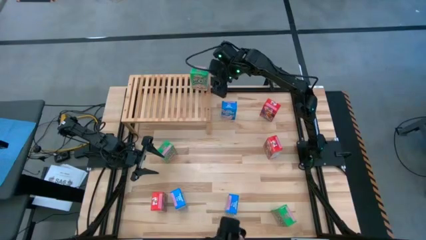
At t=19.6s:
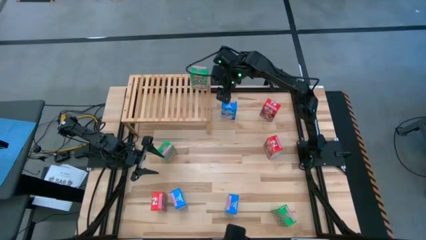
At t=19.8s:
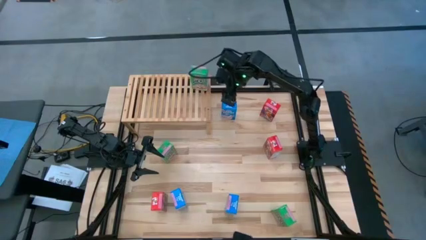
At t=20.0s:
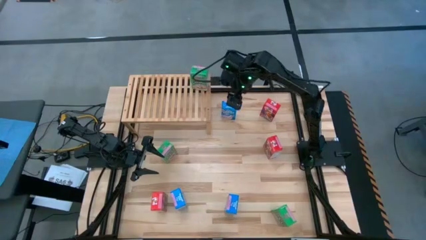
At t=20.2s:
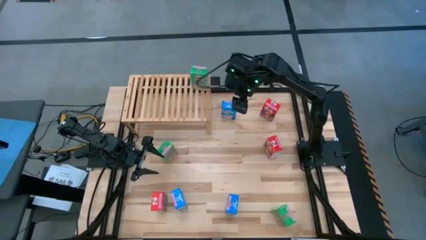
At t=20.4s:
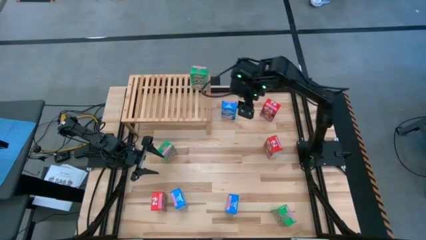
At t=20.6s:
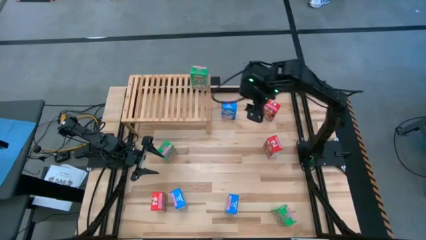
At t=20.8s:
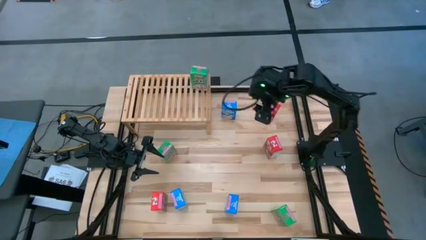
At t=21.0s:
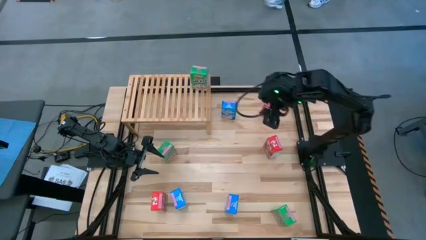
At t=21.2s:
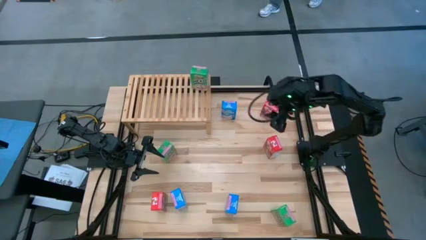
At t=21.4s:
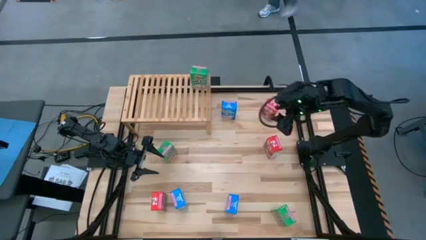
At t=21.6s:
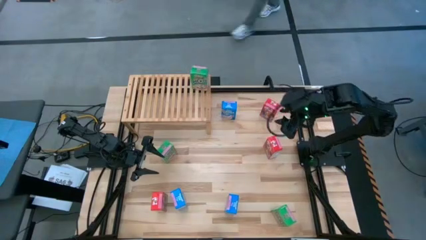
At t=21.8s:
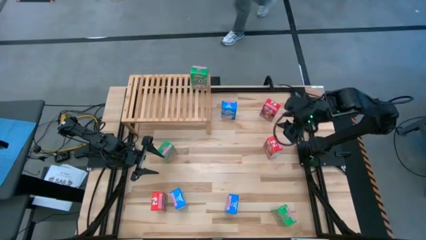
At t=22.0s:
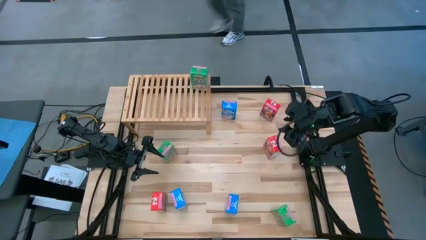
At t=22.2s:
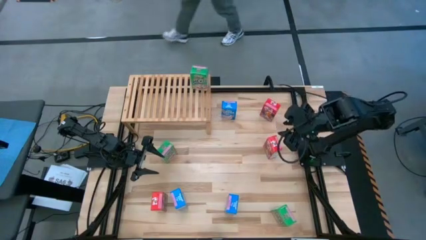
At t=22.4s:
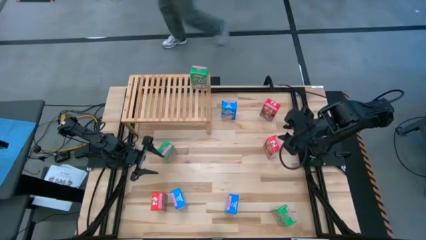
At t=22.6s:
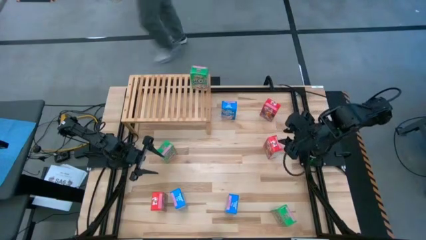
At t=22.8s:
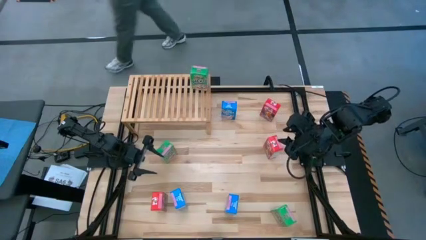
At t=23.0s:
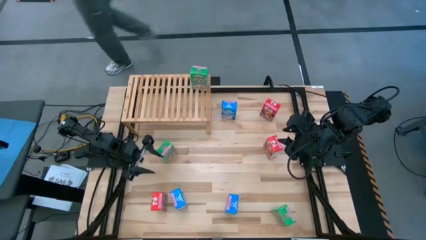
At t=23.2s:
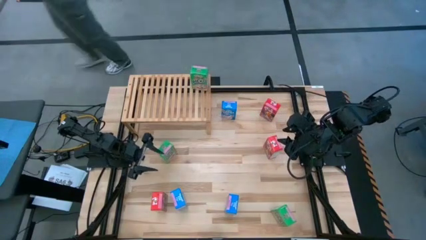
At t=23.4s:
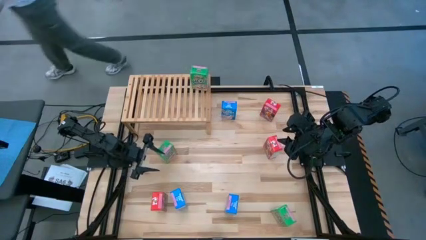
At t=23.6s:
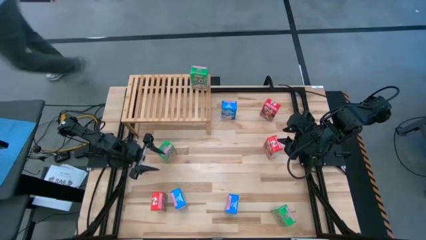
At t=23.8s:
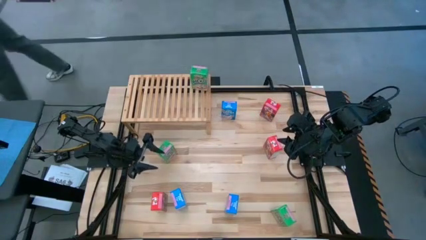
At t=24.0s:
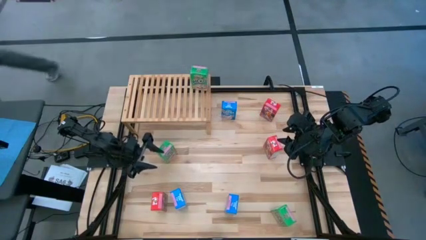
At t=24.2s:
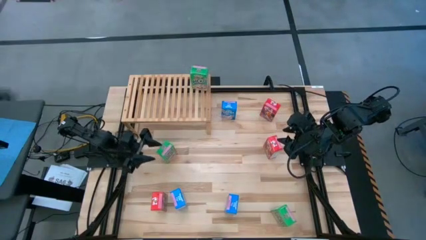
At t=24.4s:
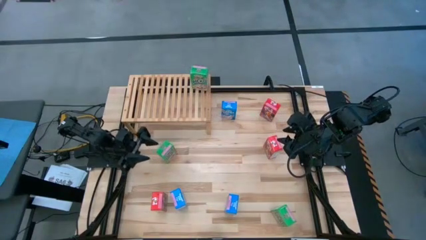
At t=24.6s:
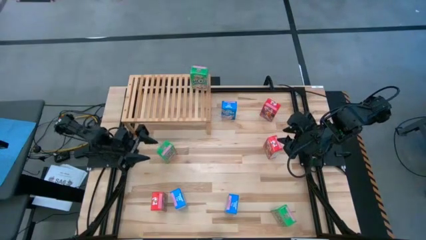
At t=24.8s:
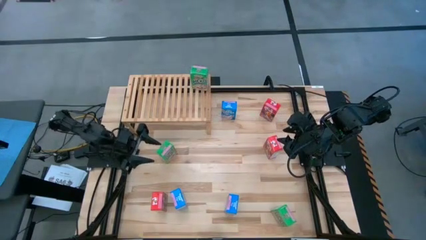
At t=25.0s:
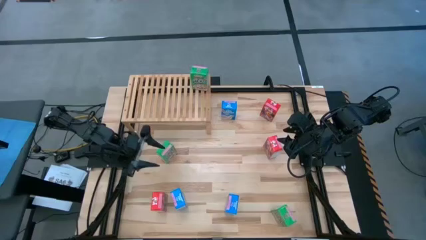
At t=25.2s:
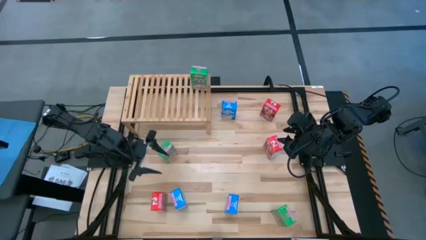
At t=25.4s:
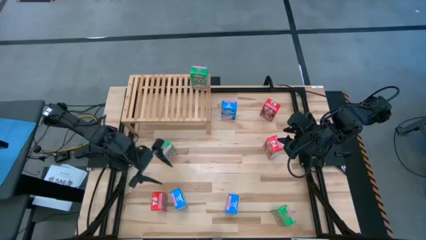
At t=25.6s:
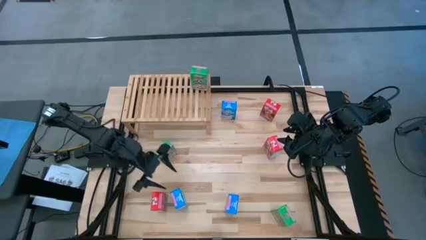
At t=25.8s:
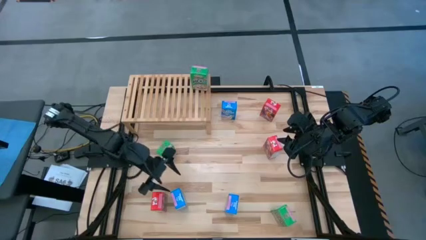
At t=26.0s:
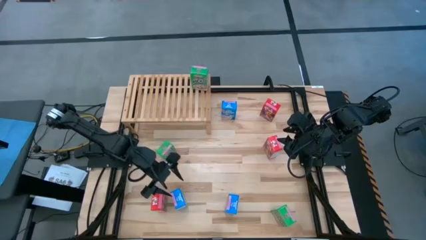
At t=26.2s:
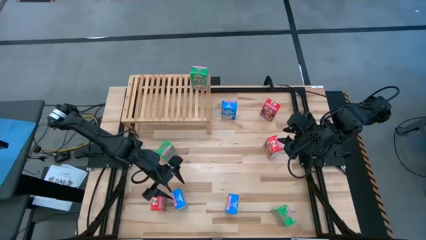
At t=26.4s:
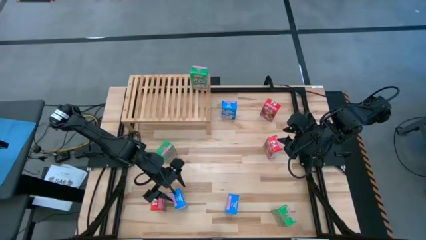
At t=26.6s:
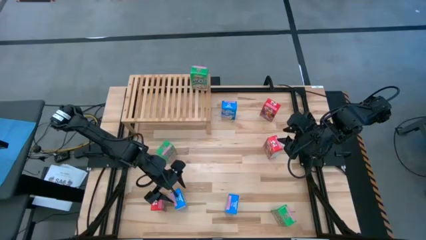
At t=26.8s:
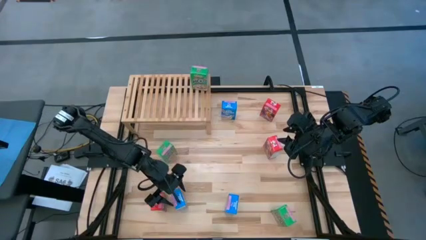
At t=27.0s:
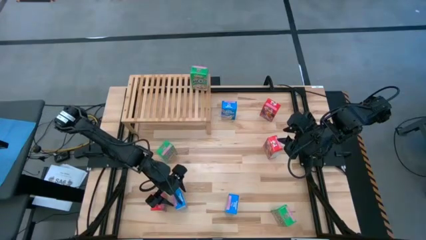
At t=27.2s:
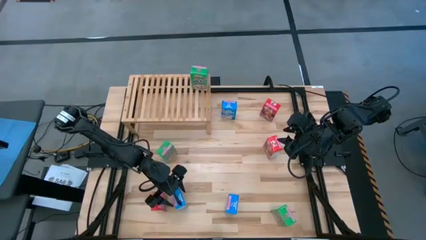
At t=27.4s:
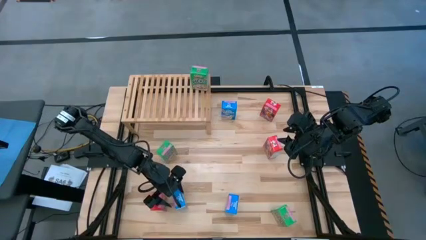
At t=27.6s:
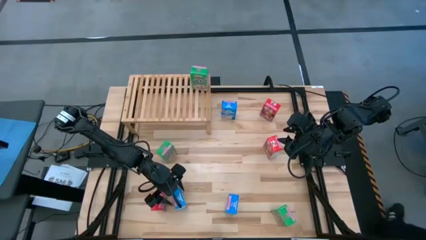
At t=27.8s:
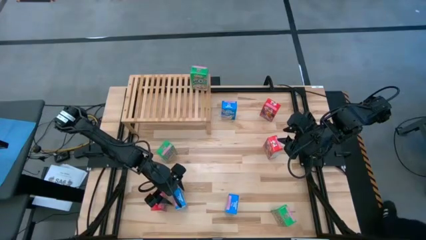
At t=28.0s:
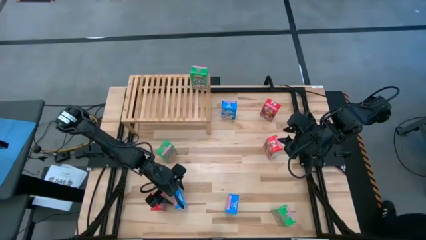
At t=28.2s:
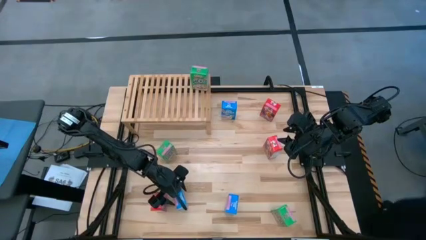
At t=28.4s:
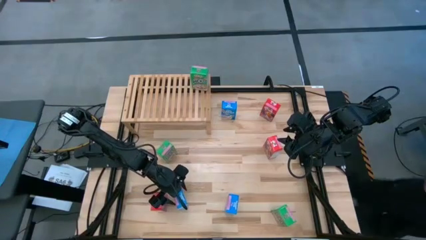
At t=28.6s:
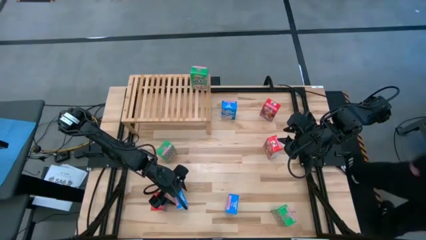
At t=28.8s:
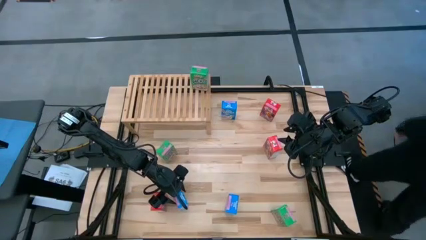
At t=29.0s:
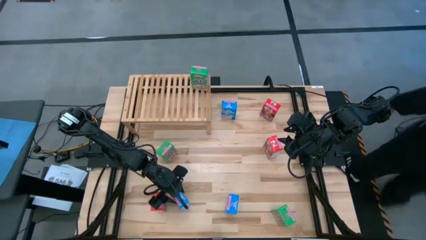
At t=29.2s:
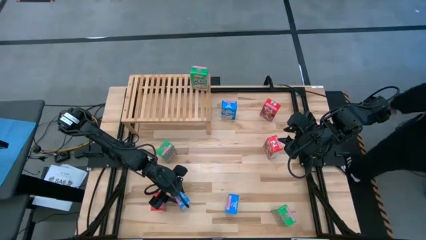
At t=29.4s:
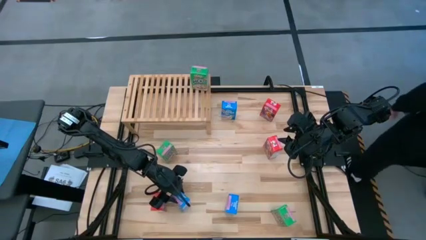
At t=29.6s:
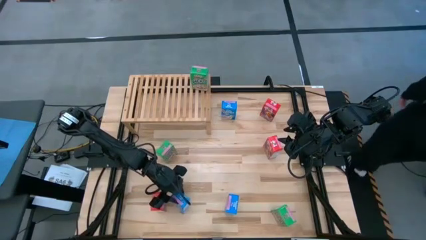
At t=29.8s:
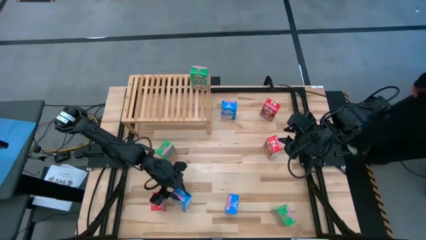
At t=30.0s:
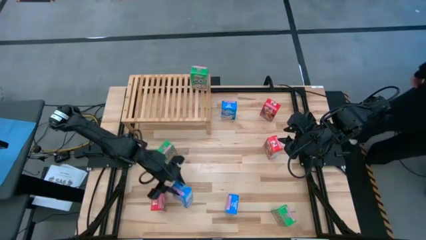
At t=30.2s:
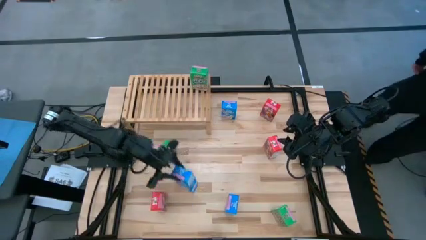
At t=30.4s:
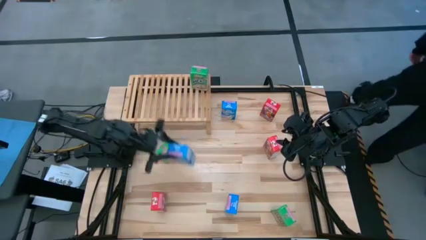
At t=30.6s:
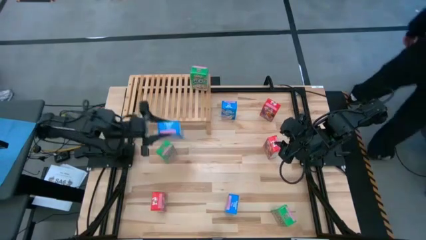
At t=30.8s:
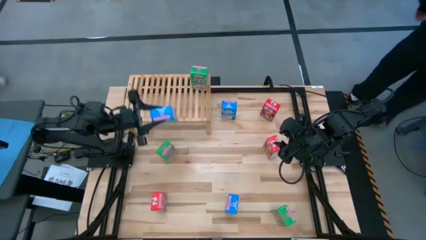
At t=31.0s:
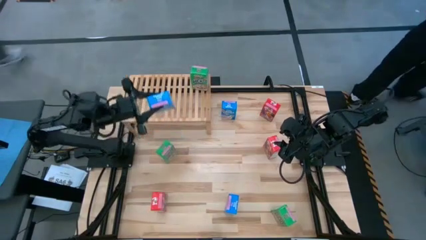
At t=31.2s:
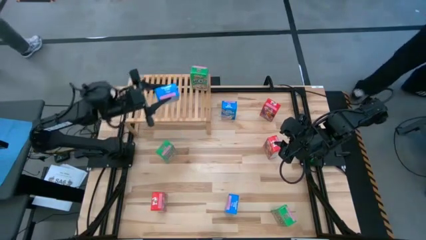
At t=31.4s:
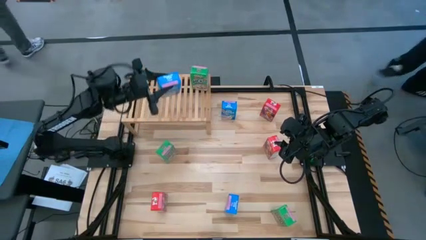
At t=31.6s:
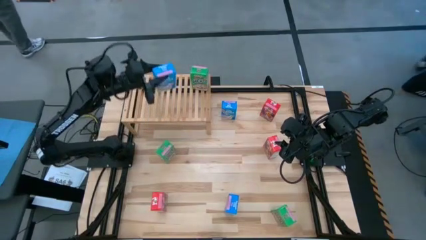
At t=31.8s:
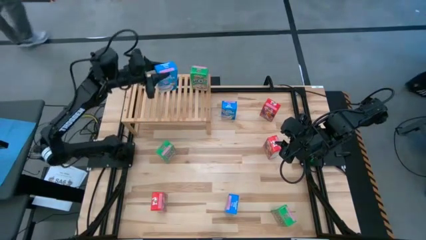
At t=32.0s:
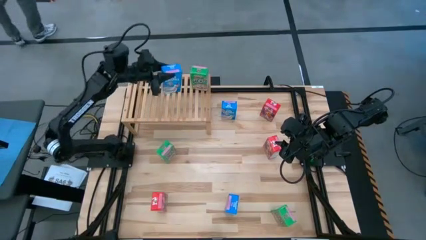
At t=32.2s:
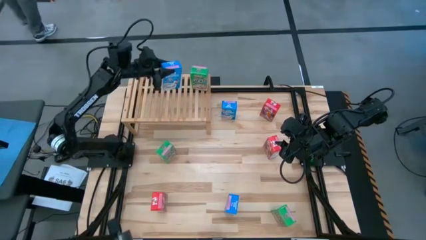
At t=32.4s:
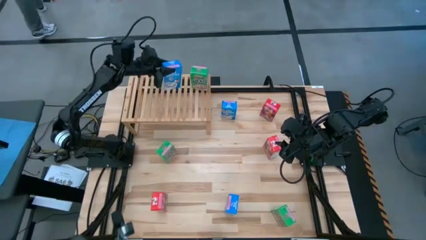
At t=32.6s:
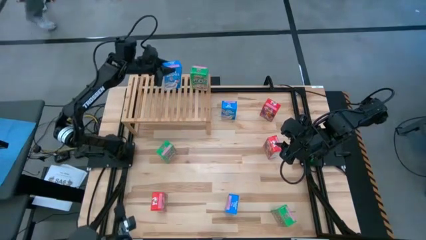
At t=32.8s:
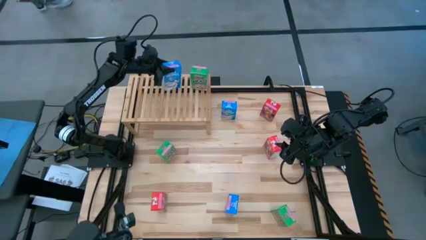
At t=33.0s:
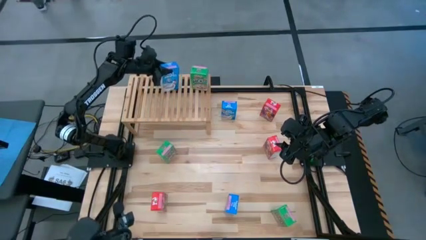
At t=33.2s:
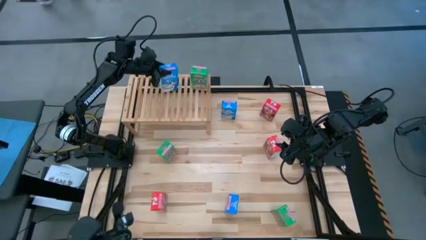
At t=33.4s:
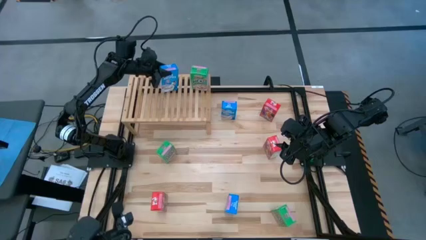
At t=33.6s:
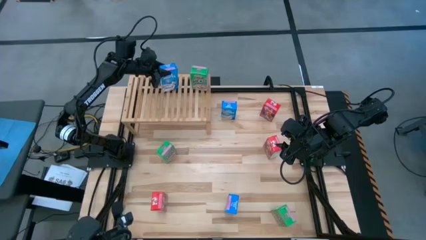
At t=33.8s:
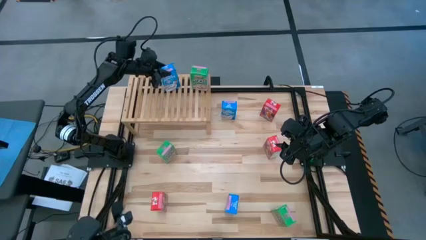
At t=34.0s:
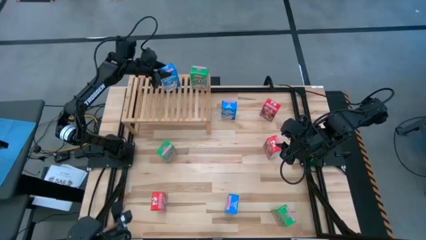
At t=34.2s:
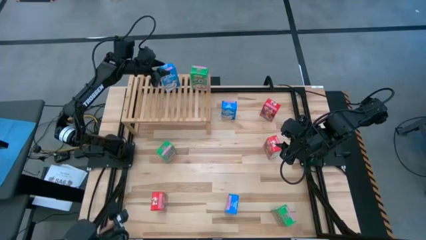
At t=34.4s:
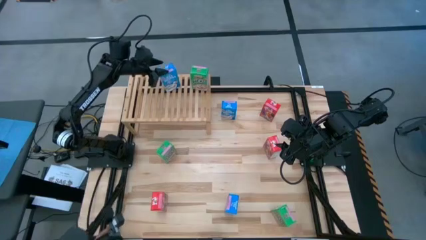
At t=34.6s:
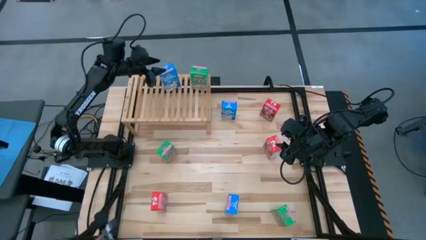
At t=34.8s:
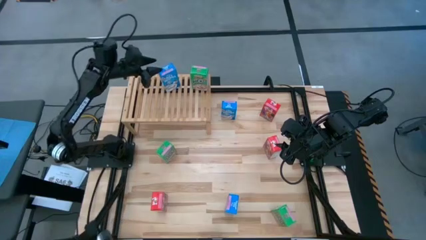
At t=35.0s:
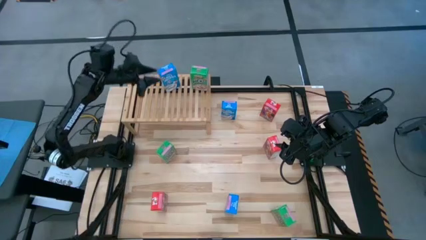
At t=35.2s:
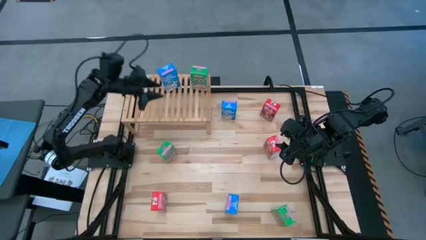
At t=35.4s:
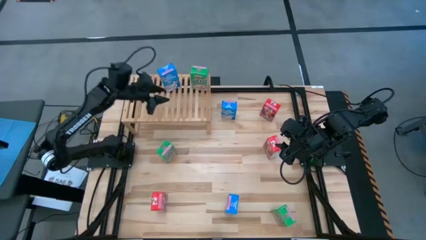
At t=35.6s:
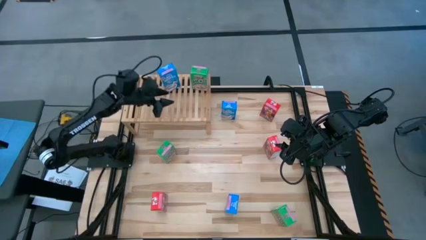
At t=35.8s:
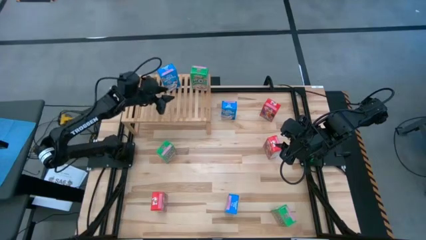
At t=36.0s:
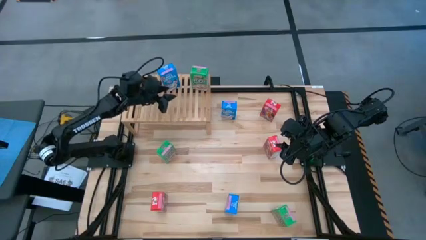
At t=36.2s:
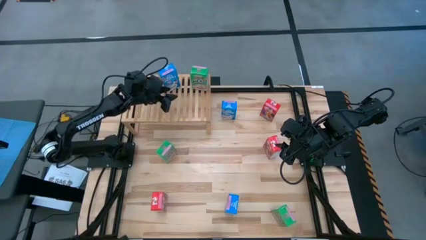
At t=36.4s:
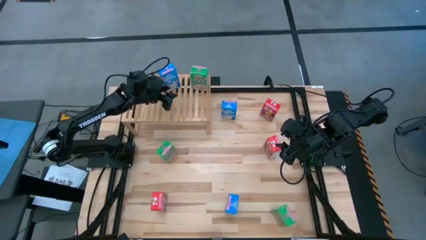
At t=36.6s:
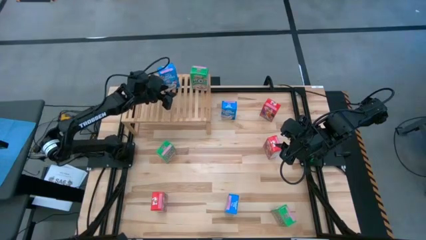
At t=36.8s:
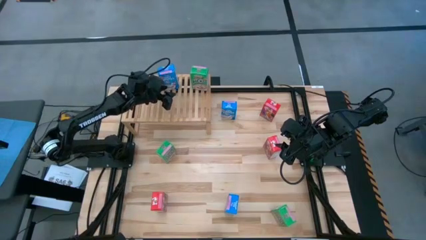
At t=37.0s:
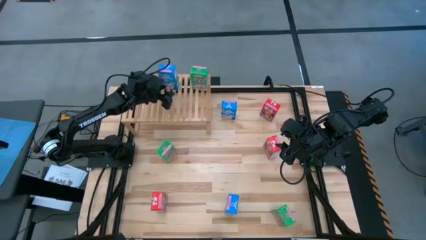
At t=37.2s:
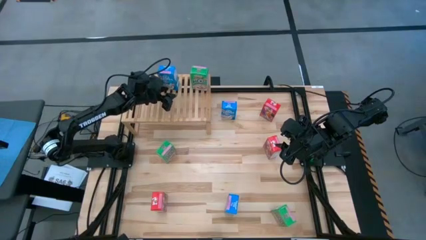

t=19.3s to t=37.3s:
Task: Stack cereal on shelf
Put the bottom left blue cereal box on the shelf
